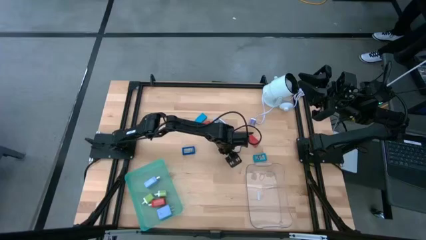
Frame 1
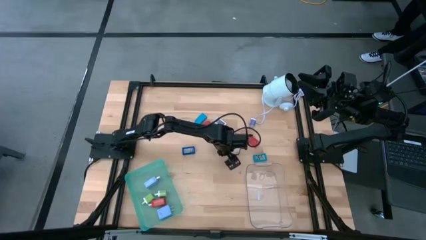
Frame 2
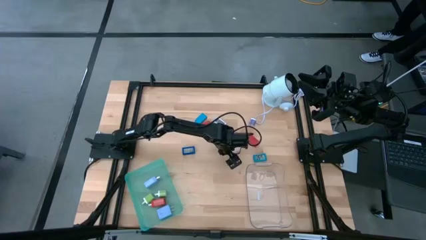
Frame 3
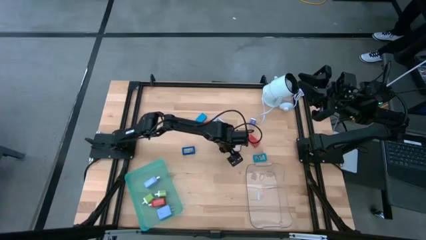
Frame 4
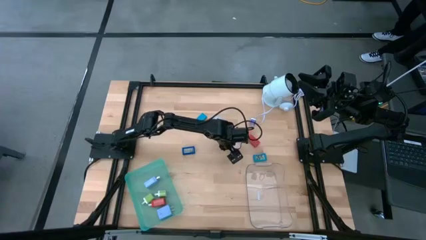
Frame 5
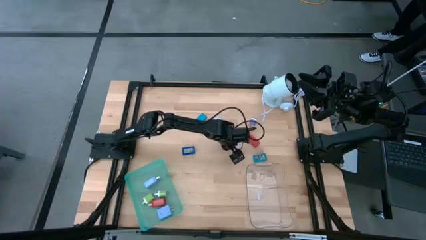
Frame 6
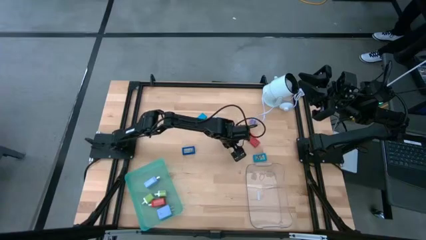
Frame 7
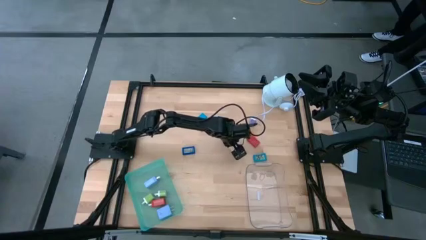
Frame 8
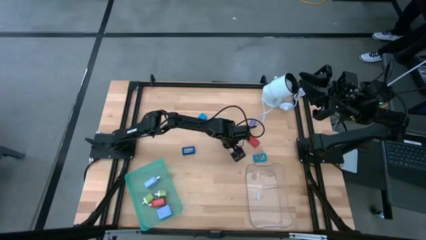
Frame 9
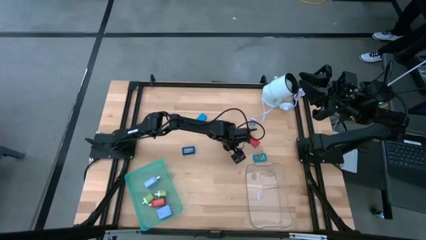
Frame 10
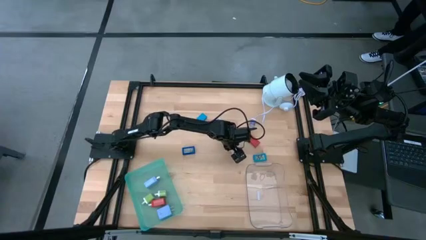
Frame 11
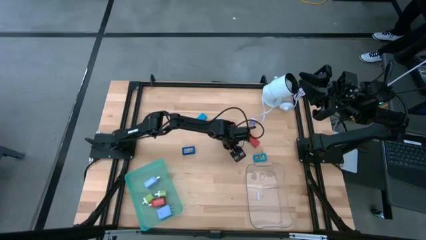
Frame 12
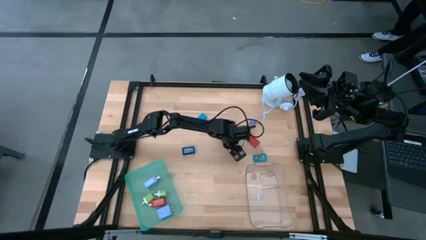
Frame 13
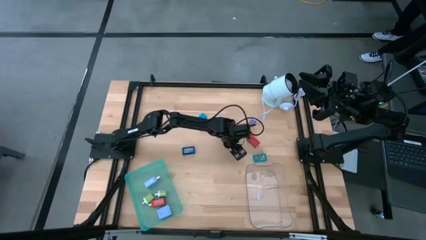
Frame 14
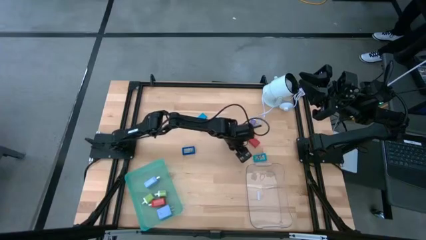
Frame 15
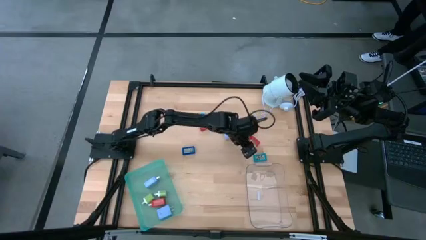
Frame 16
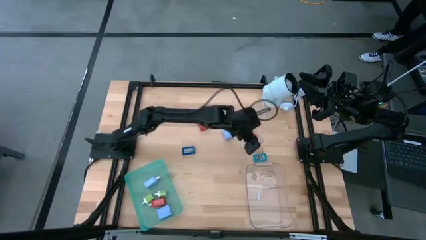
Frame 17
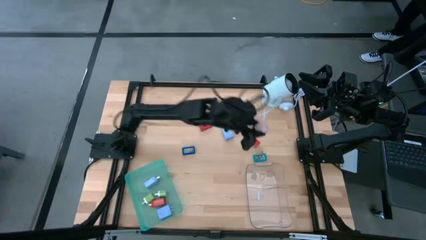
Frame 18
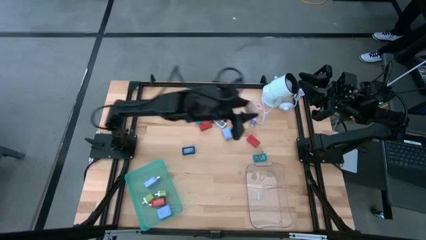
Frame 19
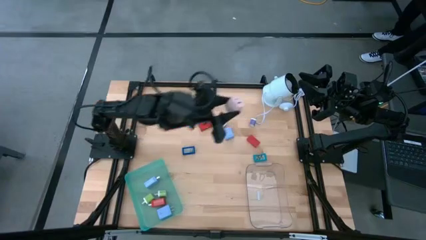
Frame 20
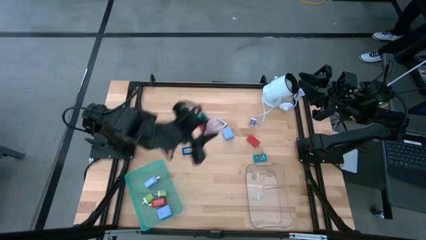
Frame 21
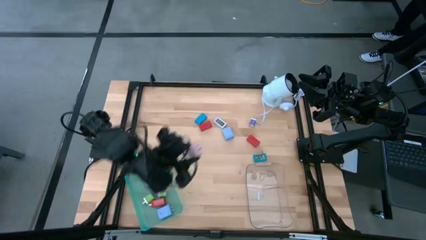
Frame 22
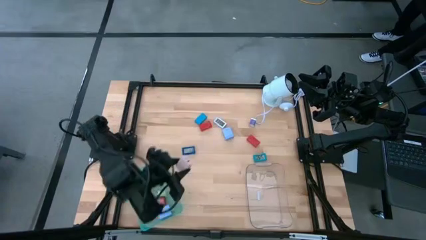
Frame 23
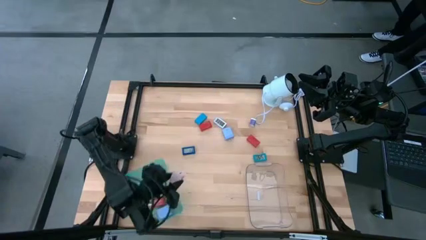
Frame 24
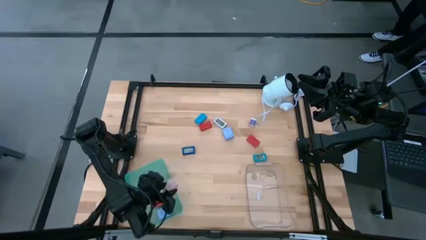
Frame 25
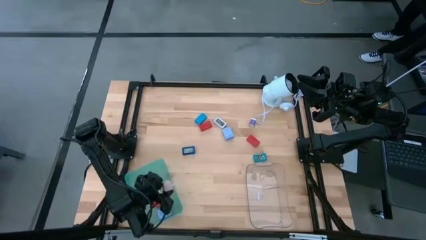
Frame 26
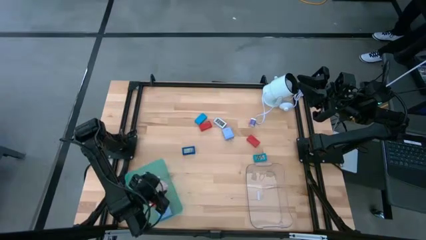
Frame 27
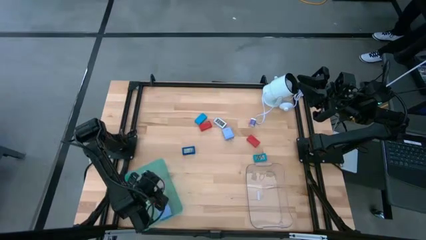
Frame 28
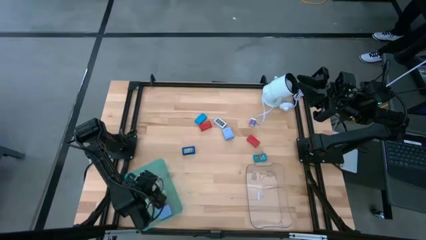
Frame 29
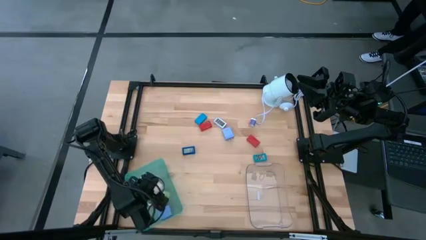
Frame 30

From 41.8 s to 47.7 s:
Task: Pick & Place Office items
Put the pink charger adapter into the blue bin

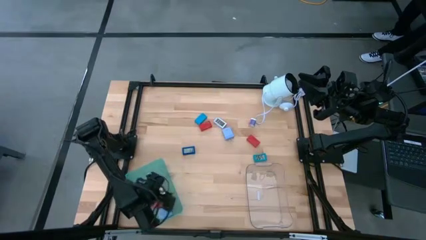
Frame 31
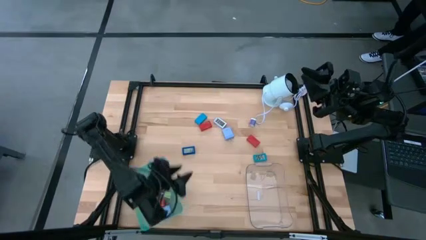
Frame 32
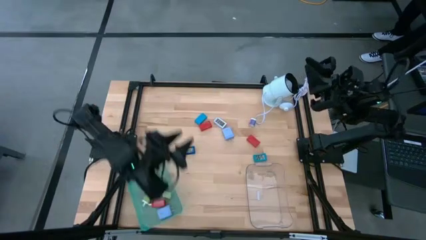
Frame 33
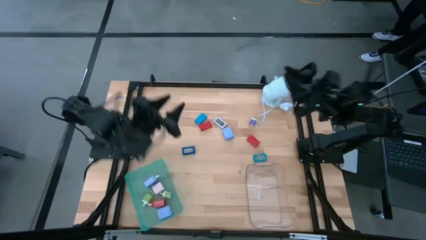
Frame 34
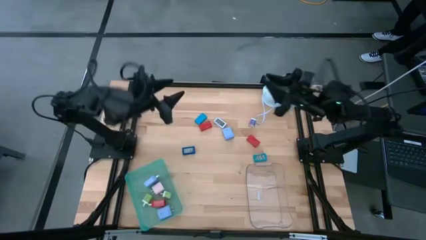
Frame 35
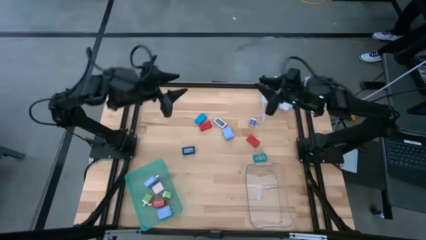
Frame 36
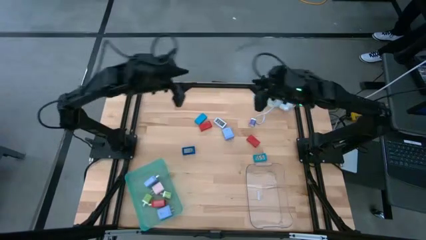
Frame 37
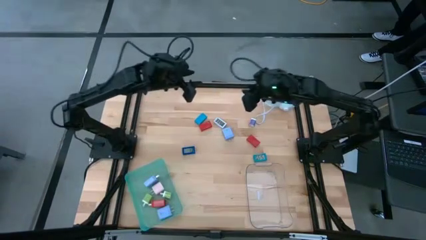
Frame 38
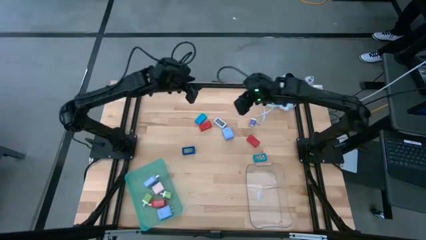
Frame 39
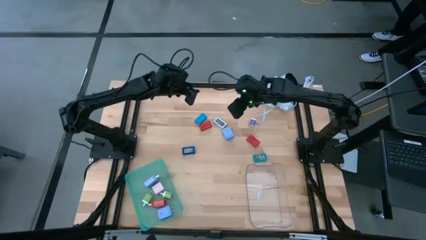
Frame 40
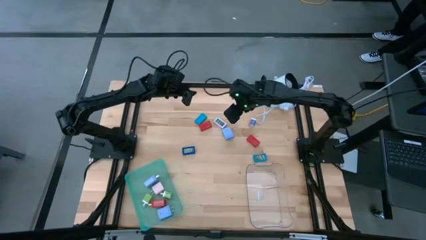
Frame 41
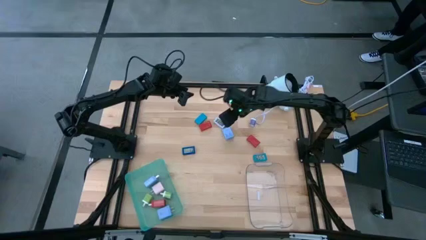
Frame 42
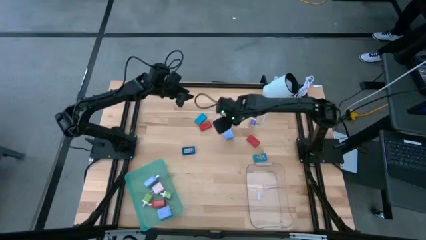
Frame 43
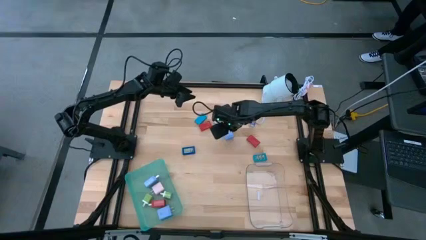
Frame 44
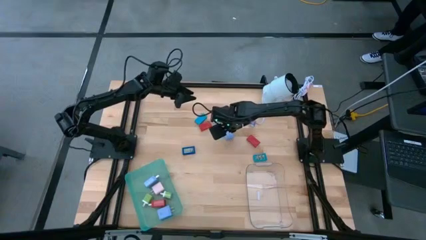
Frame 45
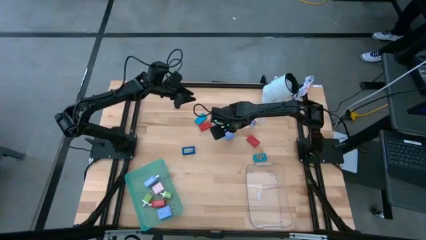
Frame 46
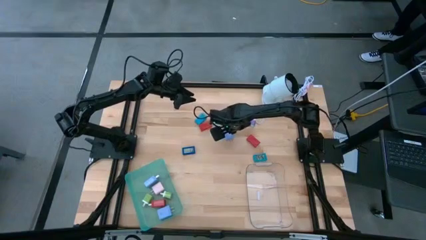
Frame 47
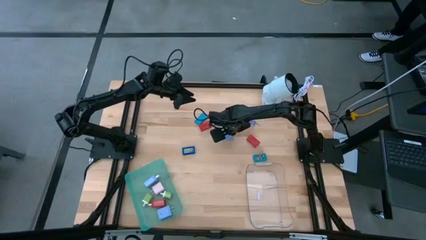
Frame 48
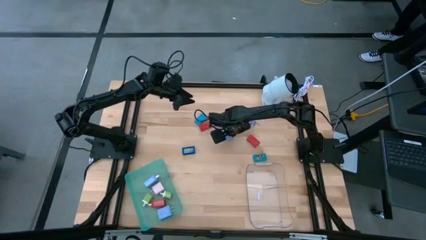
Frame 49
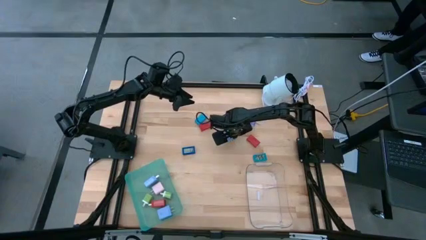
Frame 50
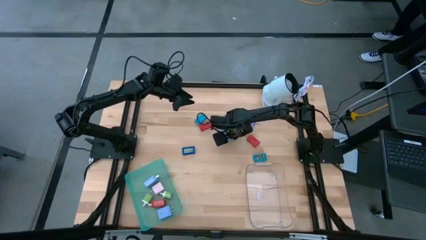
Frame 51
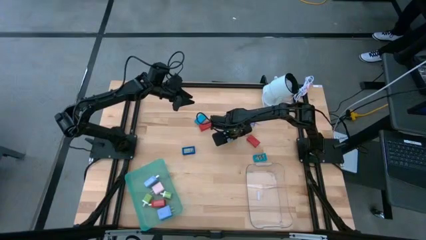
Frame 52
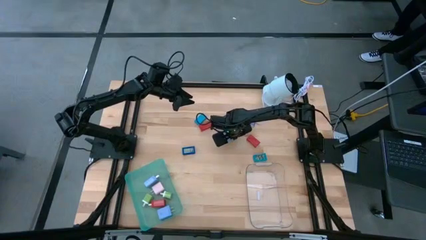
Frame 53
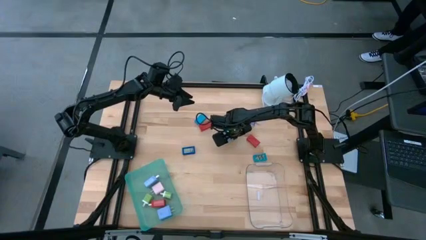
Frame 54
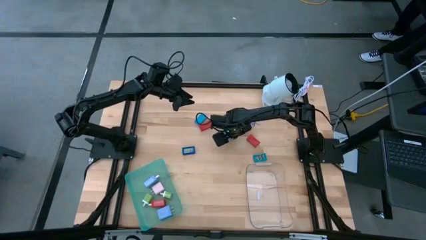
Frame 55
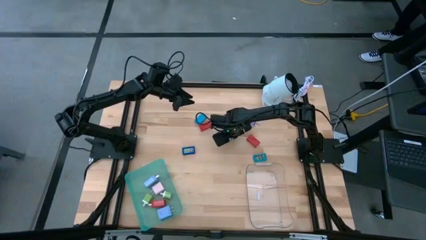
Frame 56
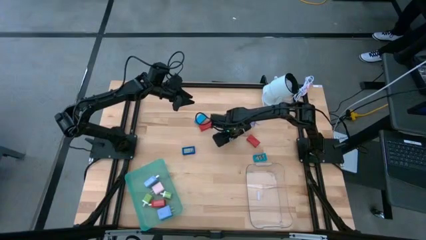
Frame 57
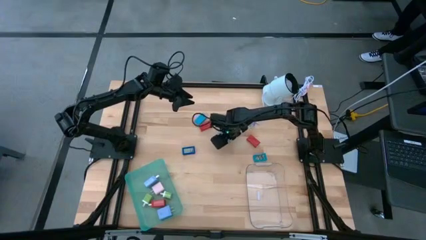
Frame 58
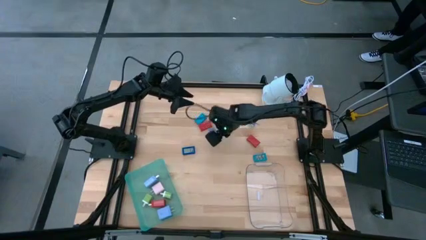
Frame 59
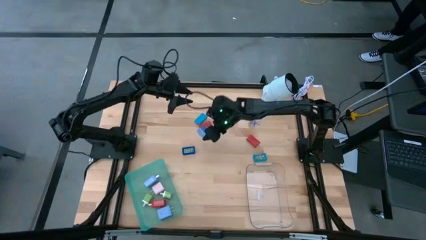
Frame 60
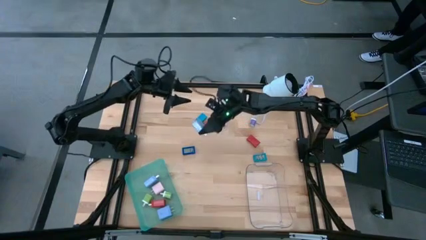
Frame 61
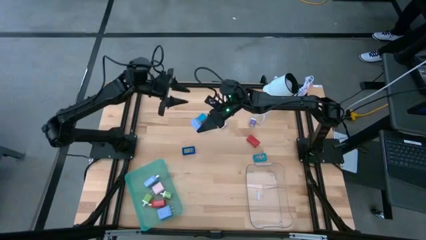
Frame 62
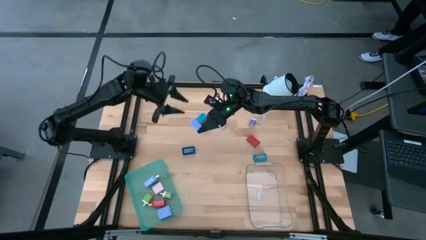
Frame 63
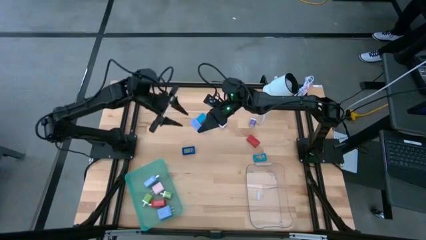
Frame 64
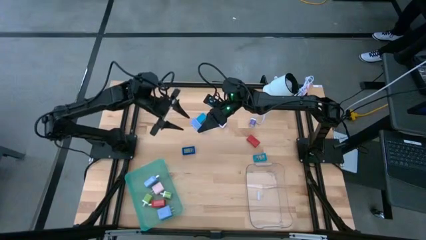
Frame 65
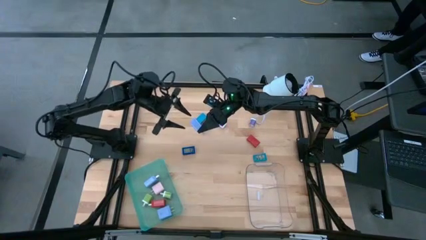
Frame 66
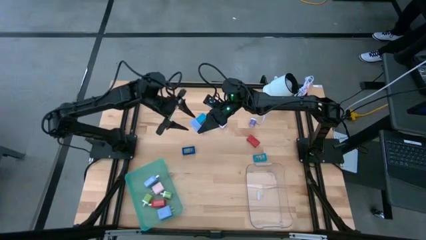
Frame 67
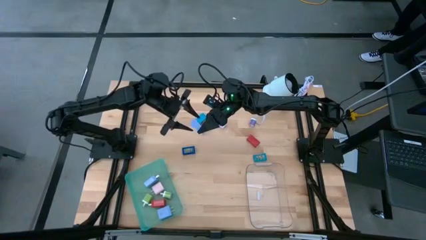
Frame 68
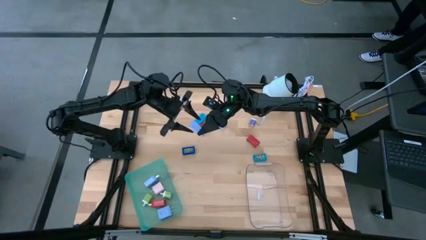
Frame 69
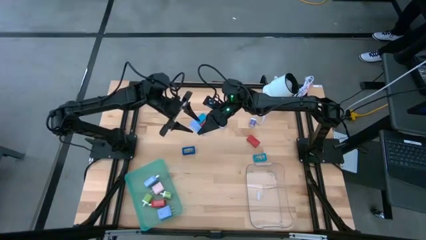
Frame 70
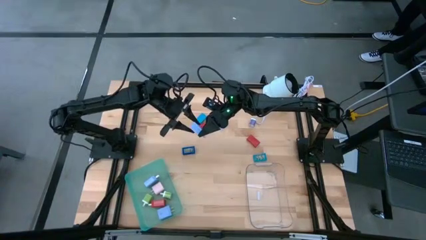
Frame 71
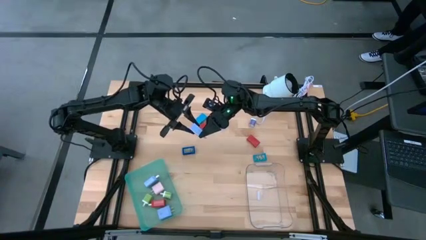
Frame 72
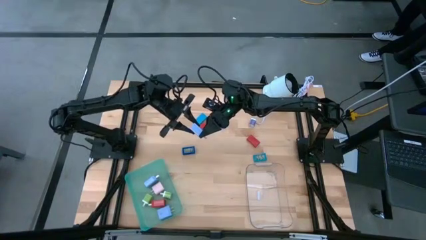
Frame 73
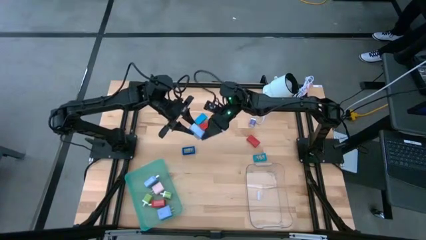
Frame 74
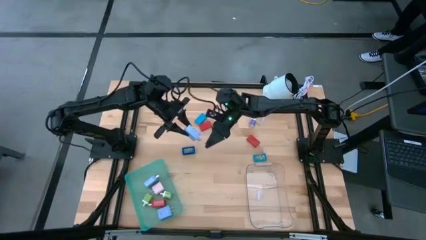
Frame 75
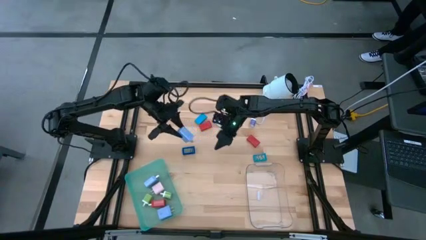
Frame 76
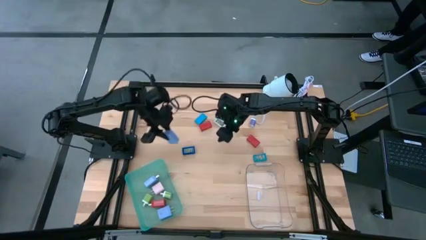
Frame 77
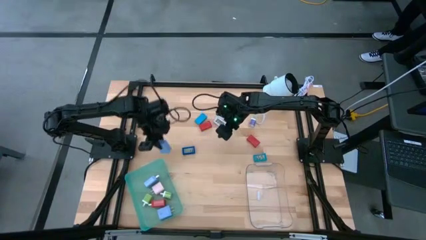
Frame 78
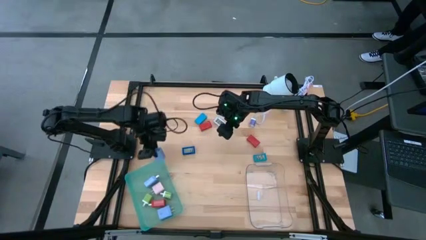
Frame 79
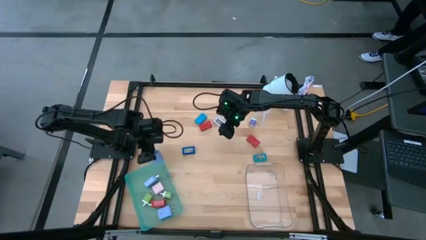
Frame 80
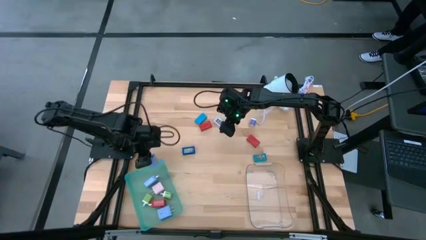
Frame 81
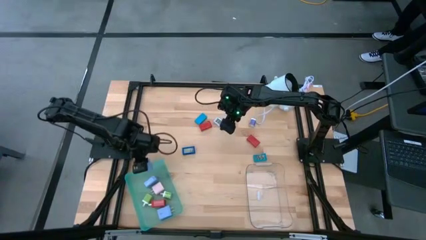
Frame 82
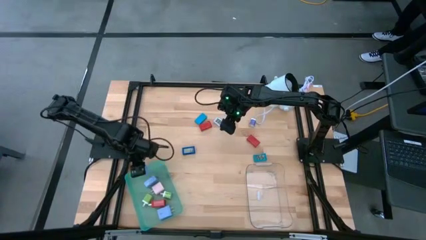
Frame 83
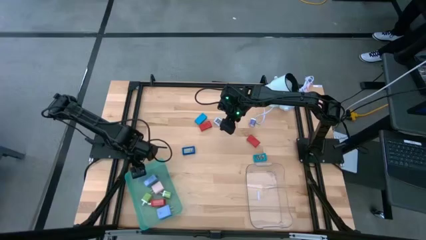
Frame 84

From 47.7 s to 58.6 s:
Put the blue charger adapter into the blue bin
